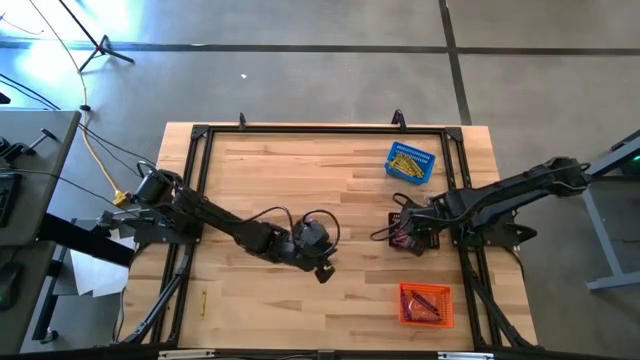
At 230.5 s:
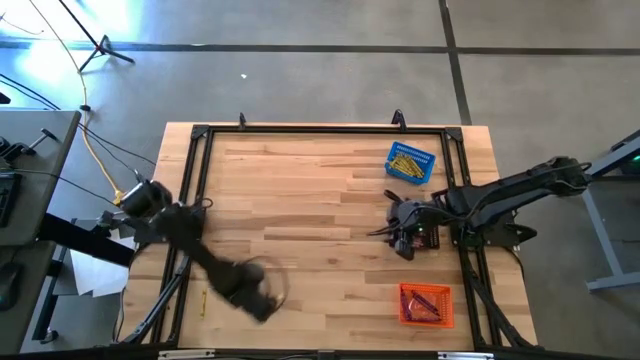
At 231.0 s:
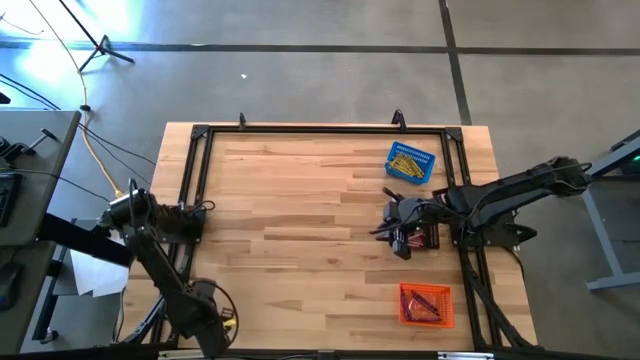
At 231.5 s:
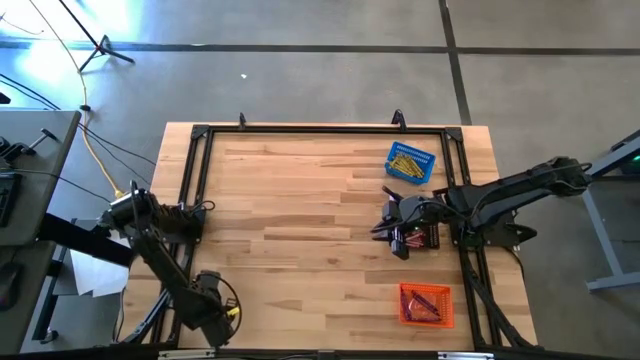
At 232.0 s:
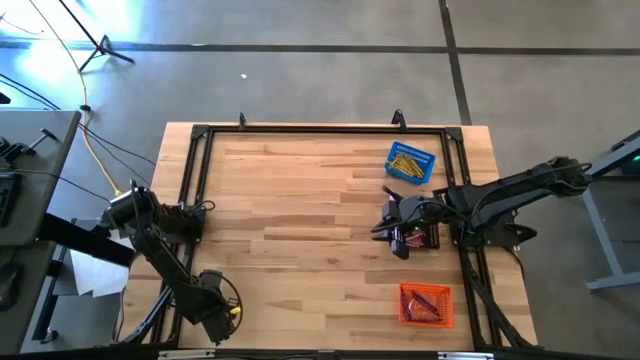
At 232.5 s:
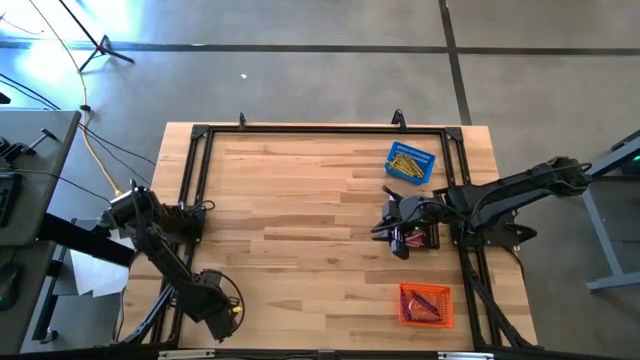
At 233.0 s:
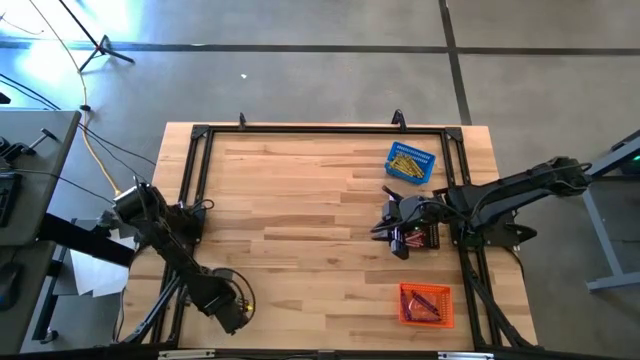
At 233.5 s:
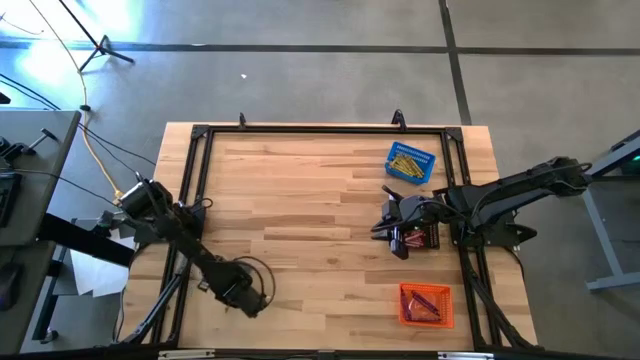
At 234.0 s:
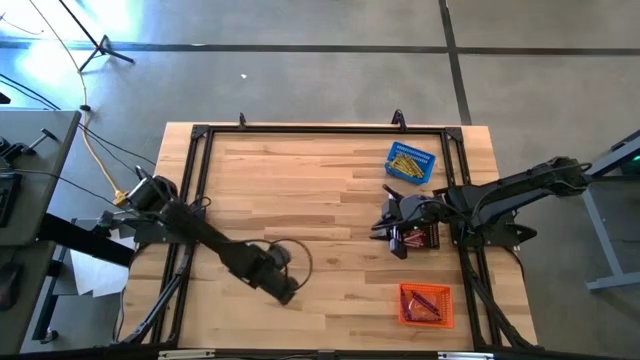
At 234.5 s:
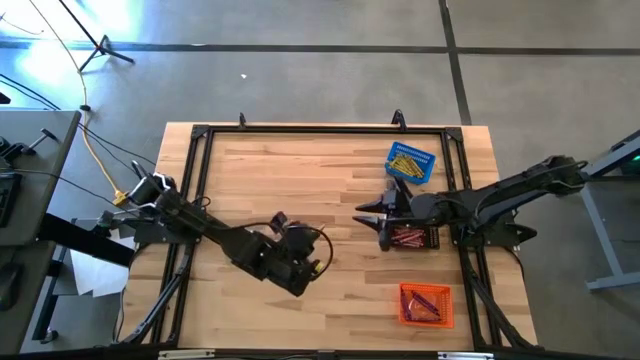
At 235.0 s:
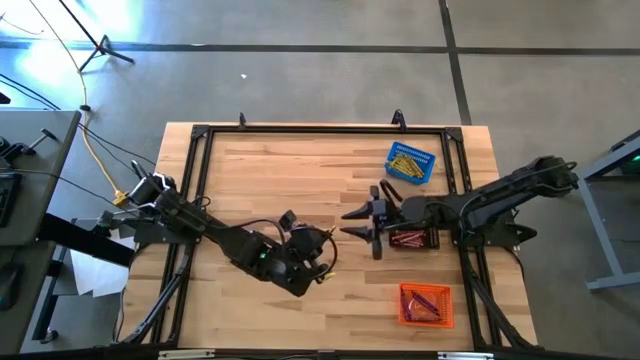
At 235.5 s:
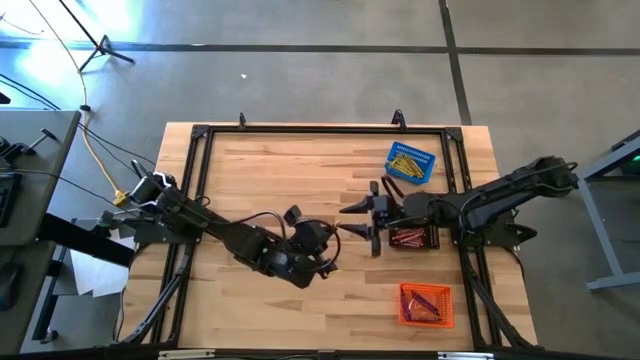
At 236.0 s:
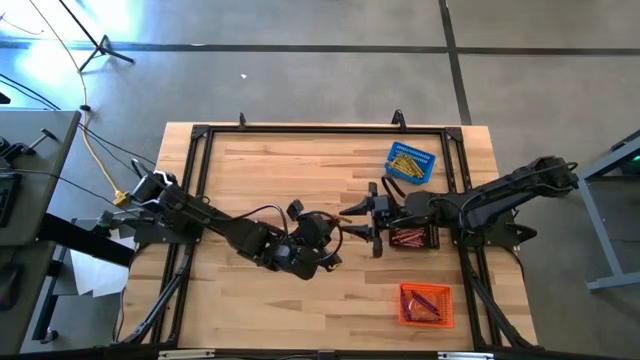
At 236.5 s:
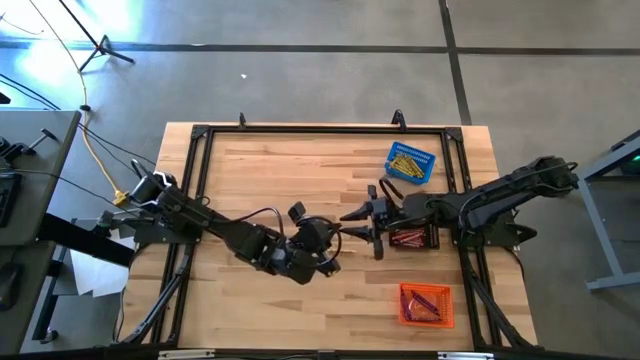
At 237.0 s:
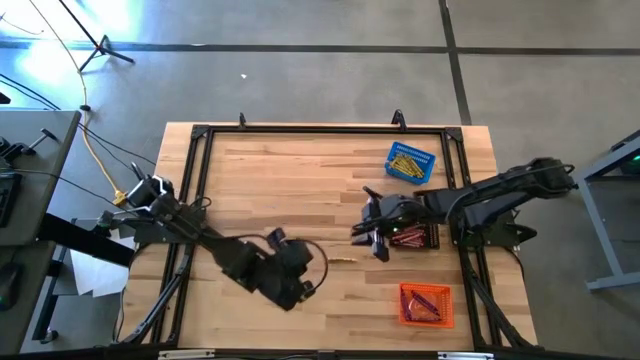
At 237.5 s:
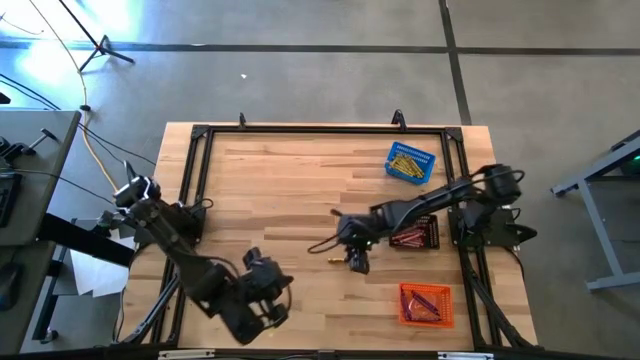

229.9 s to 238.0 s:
Task: Sort crayons
Put the yellow crayon into the blue bin

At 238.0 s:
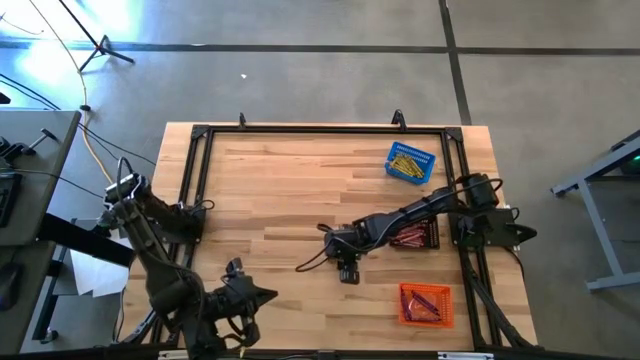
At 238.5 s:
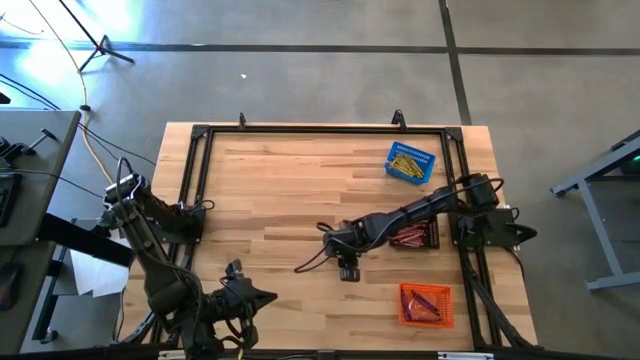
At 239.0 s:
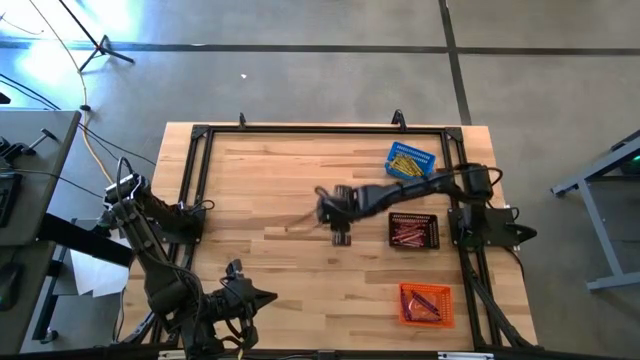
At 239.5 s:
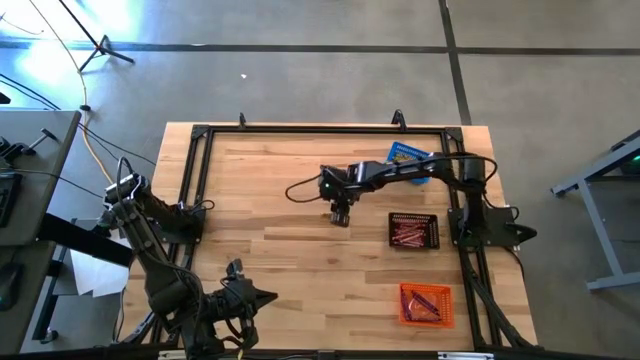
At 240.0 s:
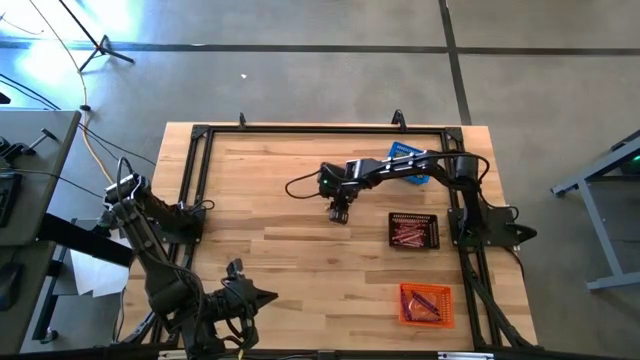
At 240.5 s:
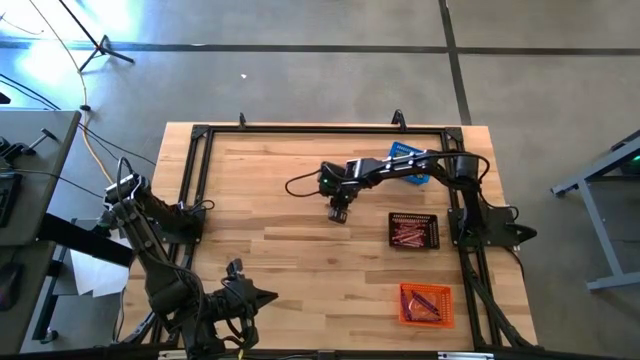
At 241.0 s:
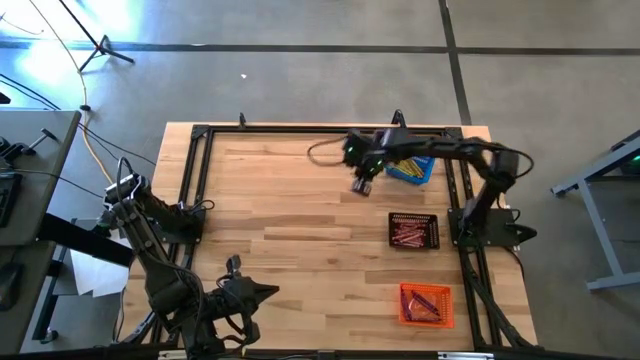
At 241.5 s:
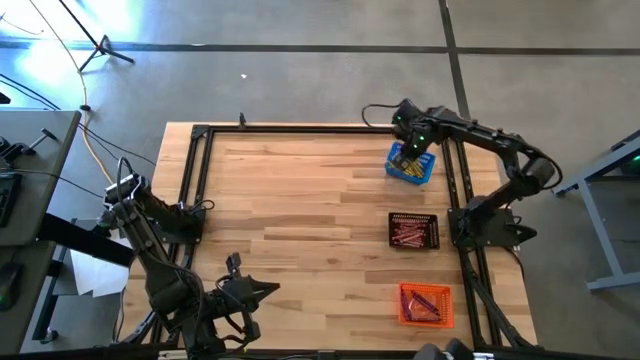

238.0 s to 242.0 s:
Put the yellow crayon into the blue bin

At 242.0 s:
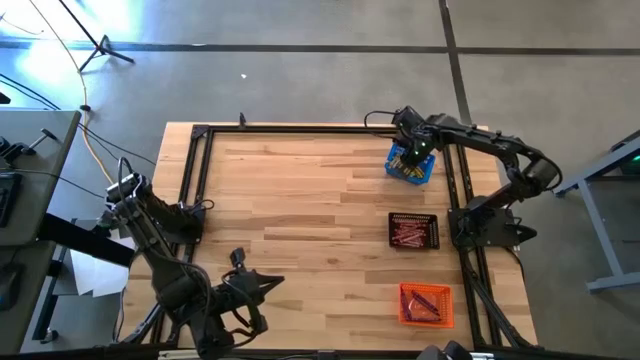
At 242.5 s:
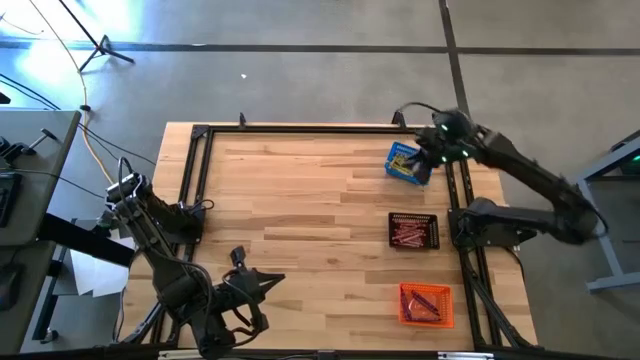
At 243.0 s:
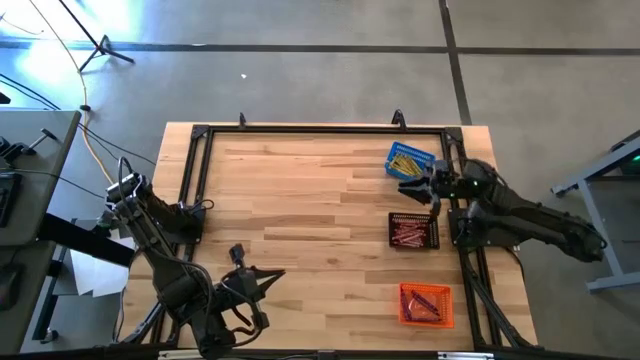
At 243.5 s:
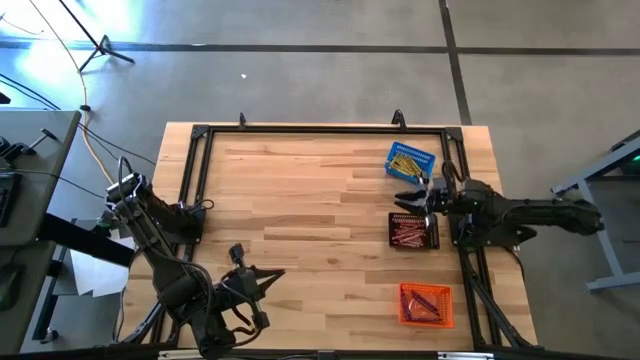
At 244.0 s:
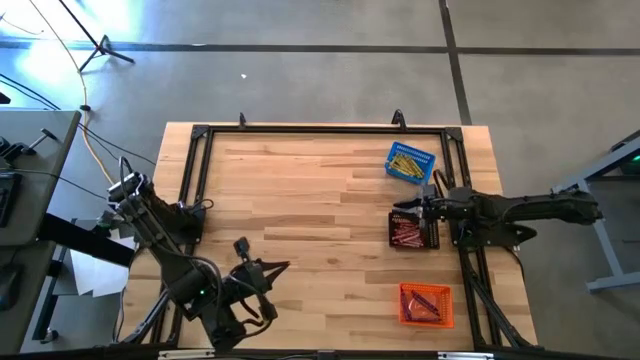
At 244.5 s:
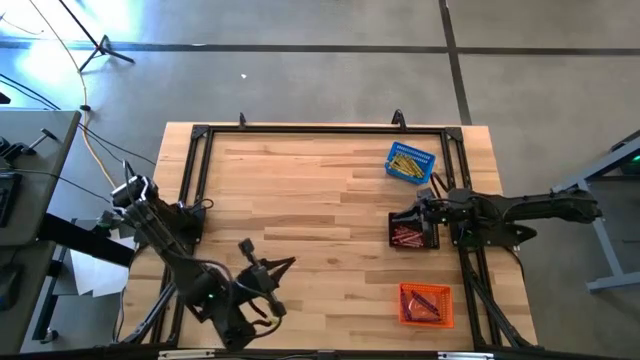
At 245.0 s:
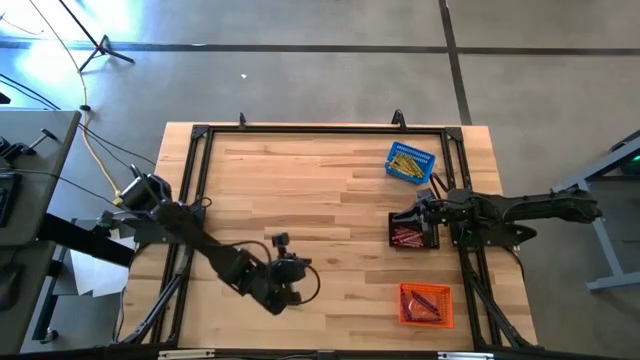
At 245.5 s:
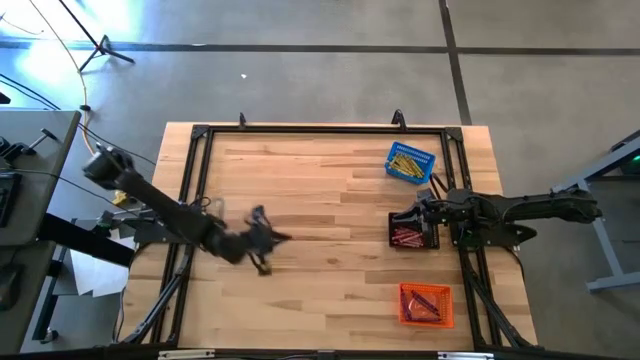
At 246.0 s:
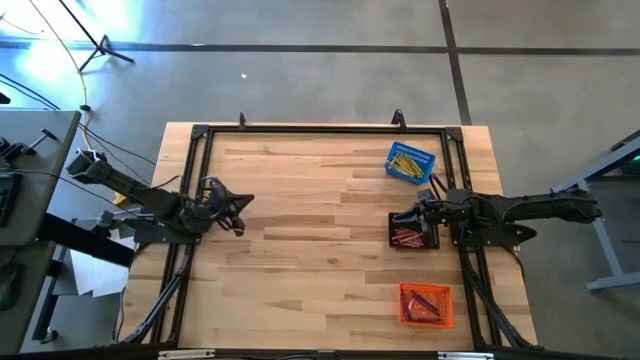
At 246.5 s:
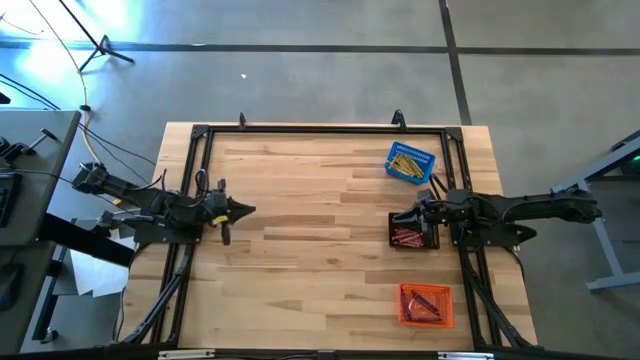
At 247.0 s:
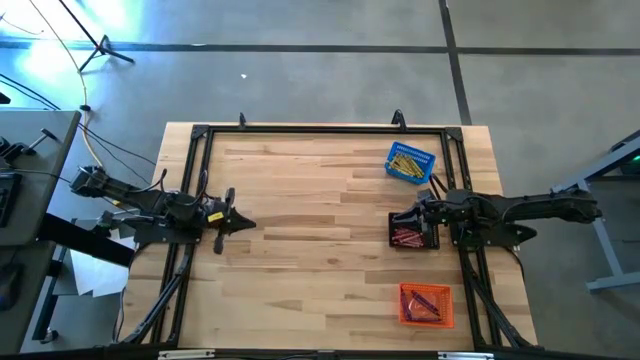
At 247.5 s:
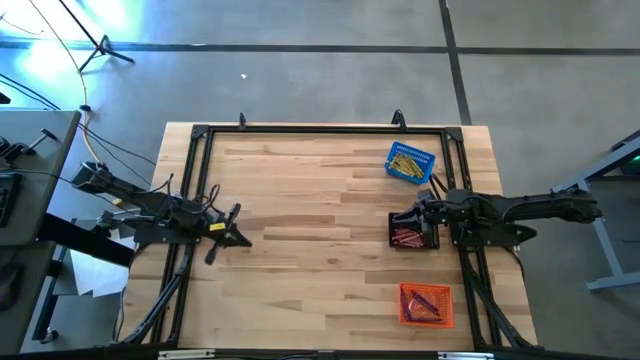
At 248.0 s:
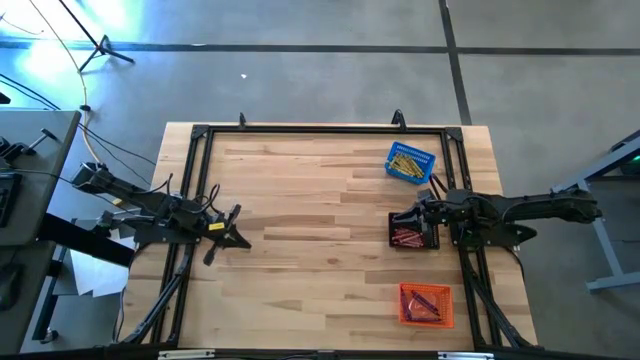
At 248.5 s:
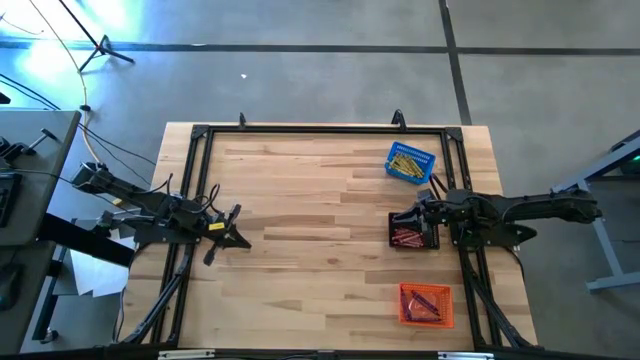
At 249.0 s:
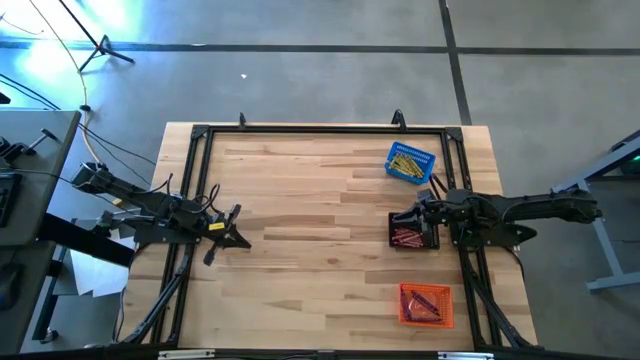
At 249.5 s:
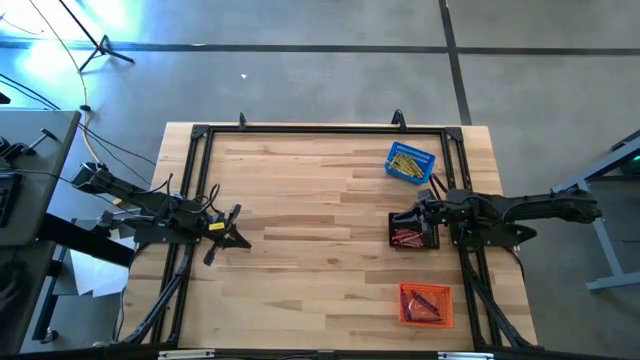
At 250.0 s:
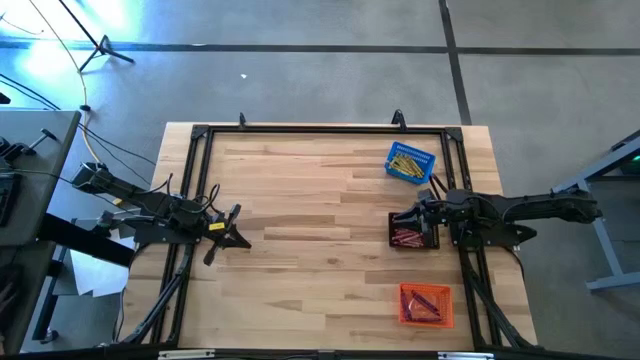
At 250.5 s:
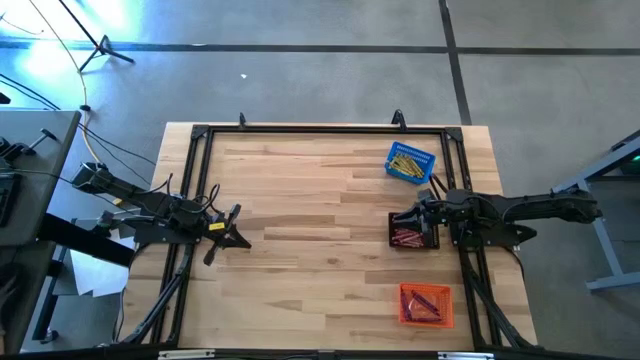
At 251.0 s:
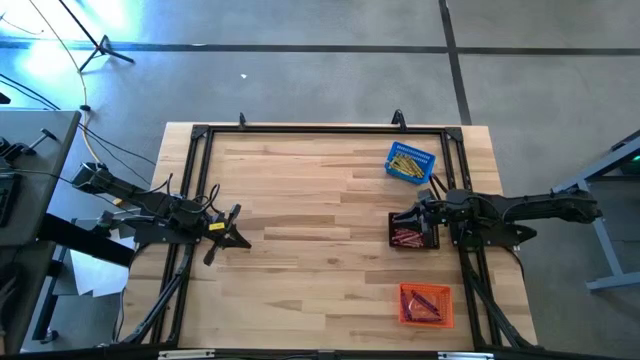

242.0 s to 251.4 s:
Return to Home Position

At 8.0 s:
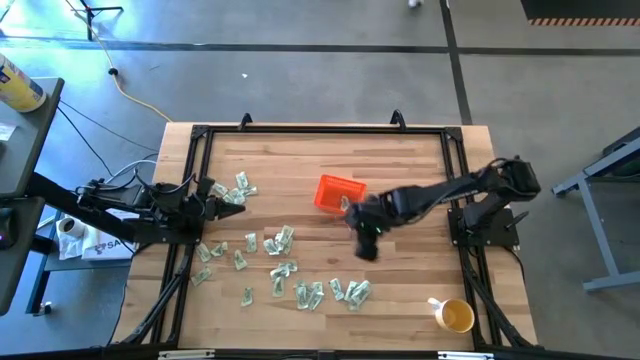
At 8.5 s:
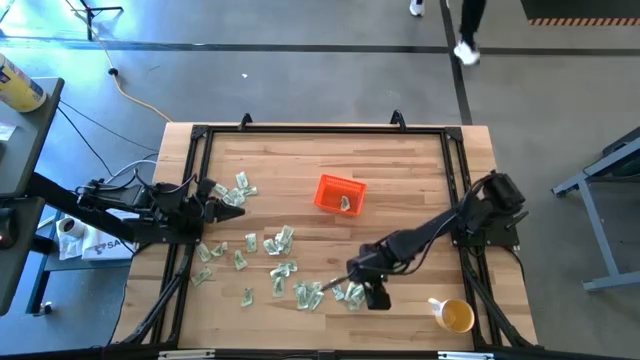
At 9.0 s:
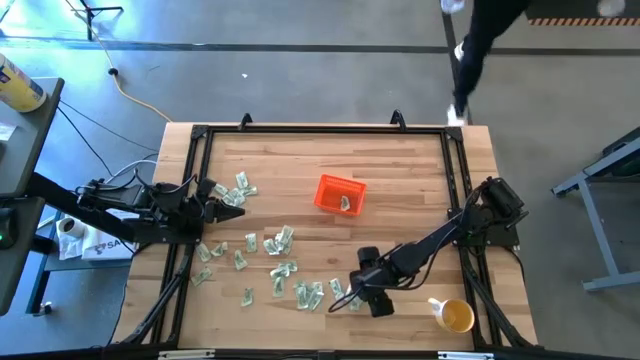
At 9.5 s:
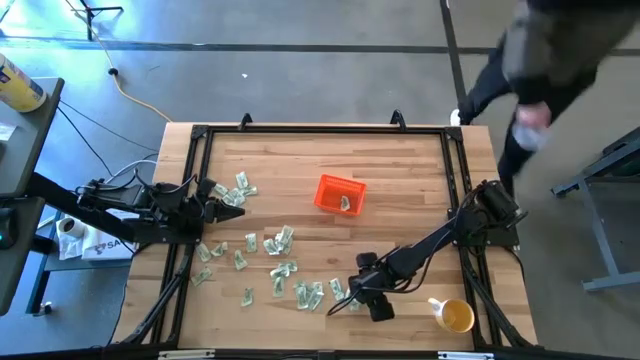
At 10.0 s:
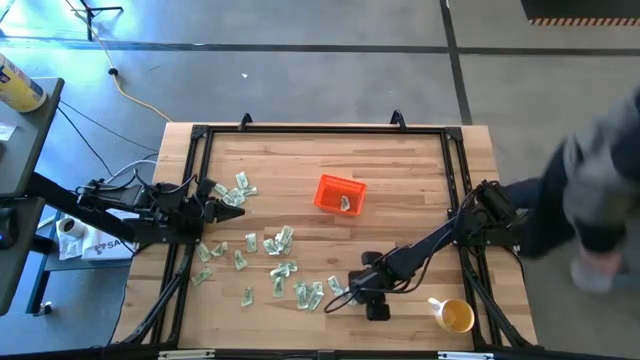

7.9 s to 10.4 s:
Task: Pick and place Stevia / Truvia into bins
Put the green stevia packet into the orange basket
